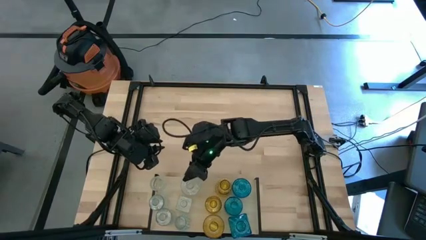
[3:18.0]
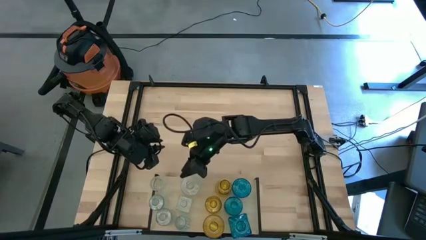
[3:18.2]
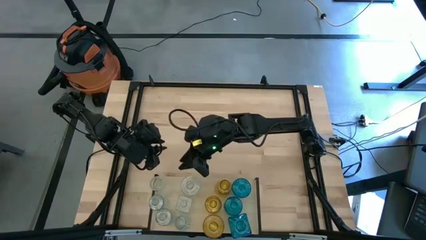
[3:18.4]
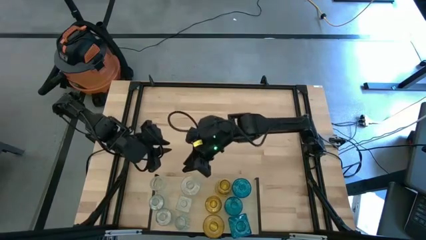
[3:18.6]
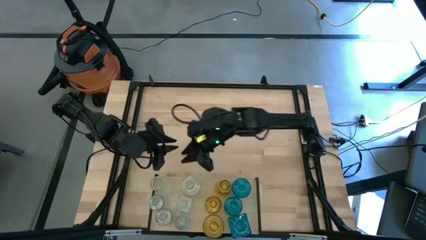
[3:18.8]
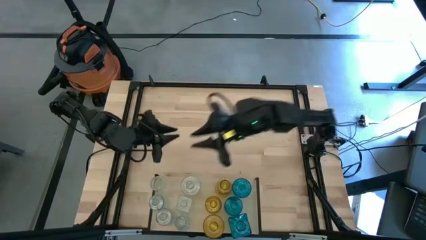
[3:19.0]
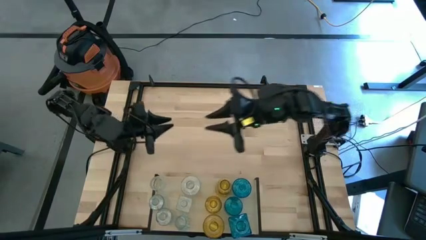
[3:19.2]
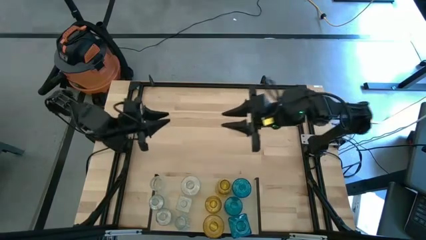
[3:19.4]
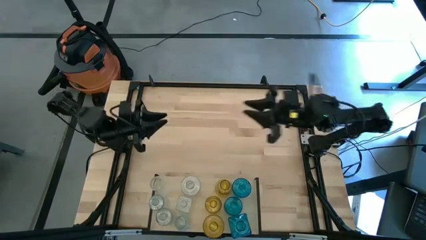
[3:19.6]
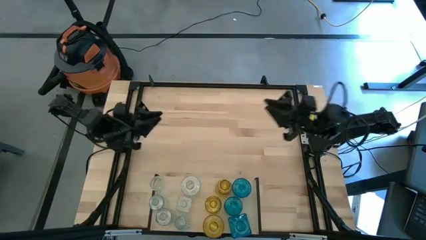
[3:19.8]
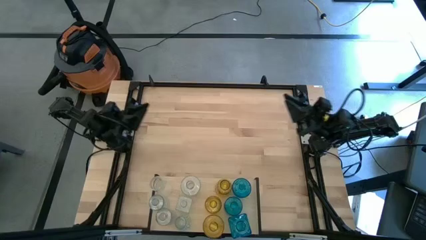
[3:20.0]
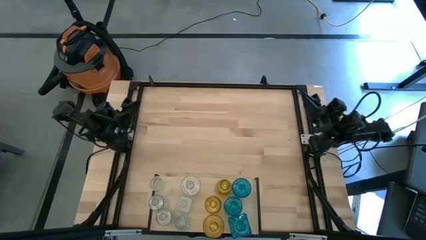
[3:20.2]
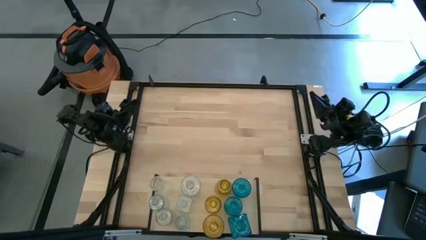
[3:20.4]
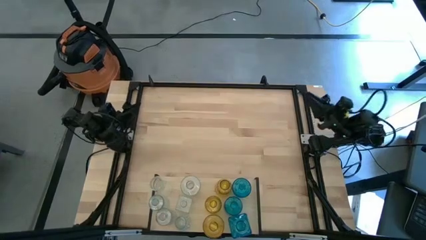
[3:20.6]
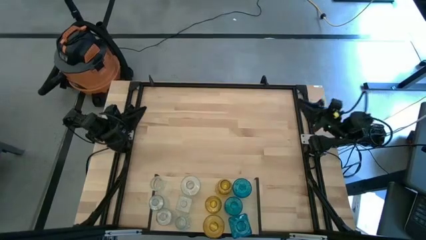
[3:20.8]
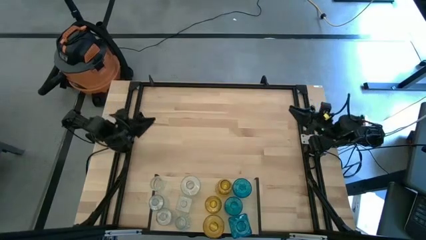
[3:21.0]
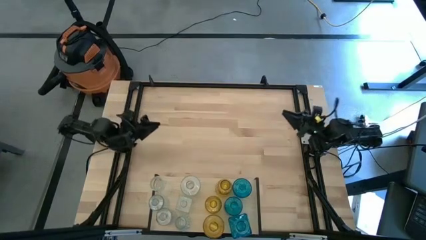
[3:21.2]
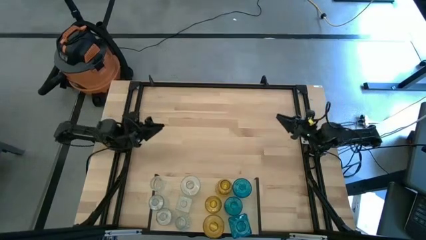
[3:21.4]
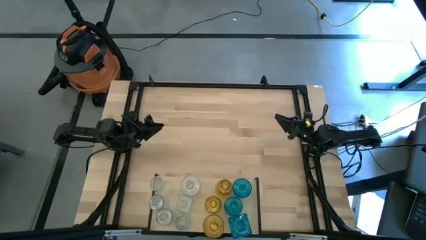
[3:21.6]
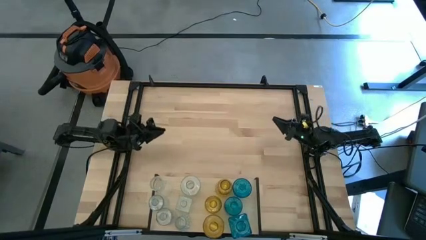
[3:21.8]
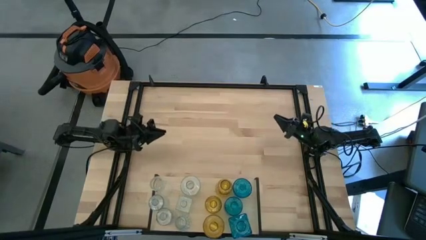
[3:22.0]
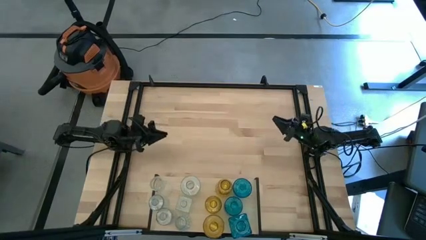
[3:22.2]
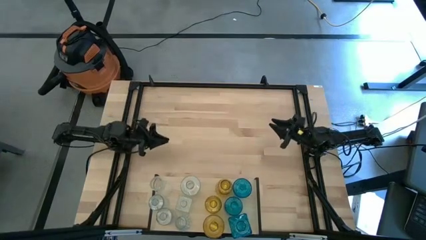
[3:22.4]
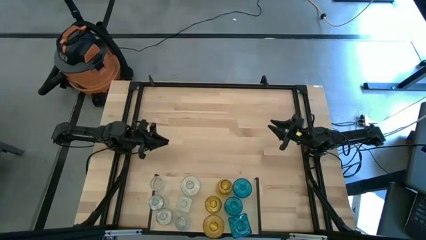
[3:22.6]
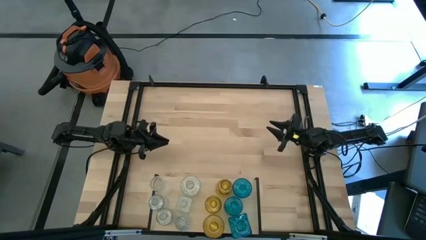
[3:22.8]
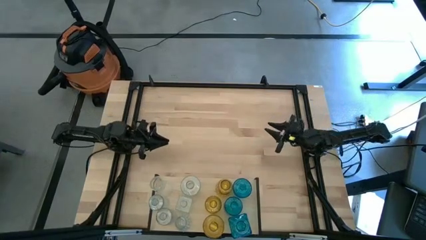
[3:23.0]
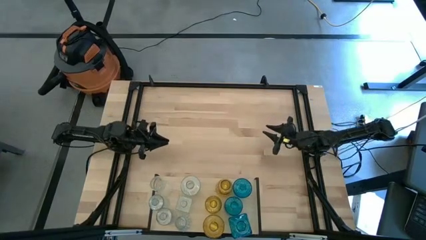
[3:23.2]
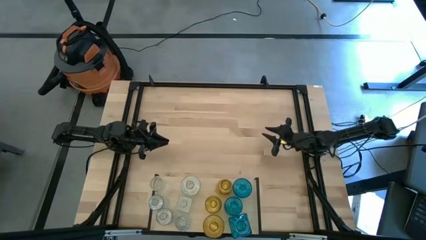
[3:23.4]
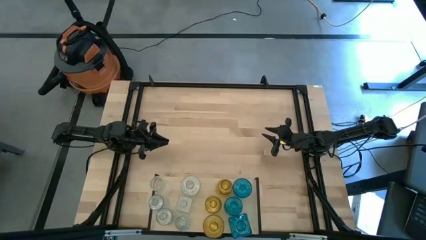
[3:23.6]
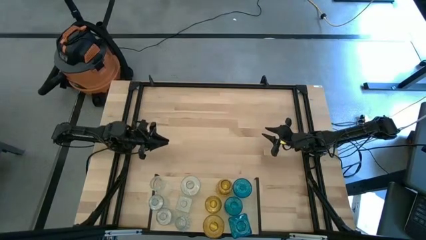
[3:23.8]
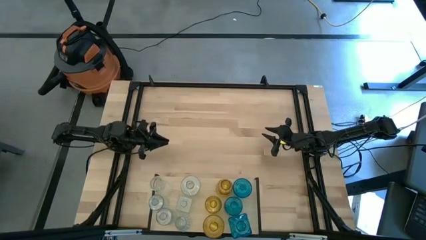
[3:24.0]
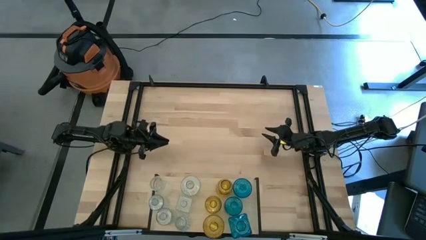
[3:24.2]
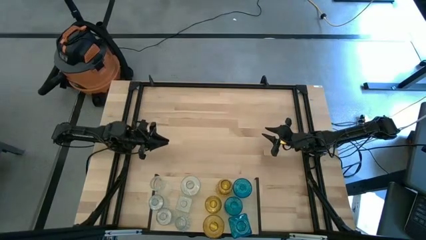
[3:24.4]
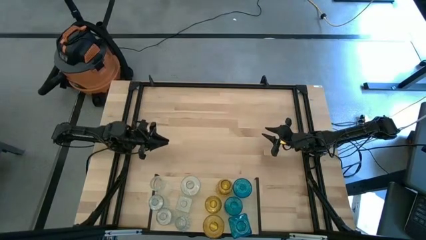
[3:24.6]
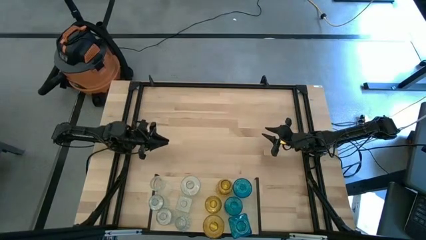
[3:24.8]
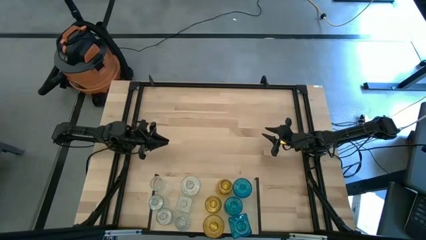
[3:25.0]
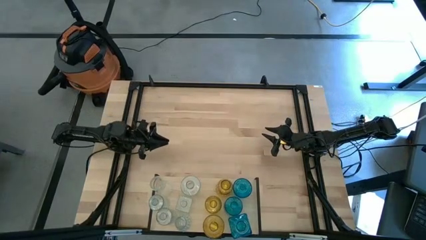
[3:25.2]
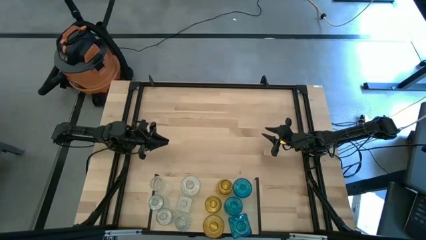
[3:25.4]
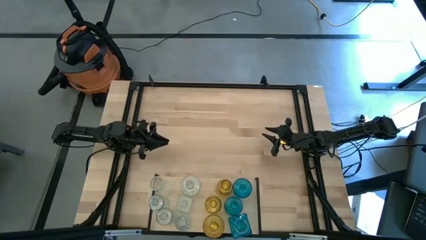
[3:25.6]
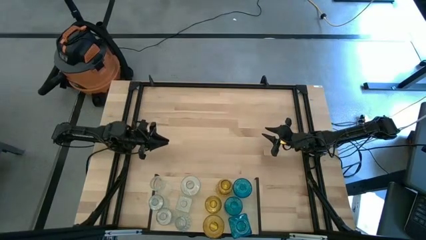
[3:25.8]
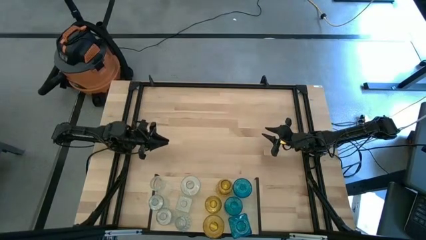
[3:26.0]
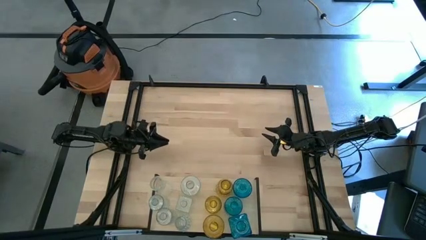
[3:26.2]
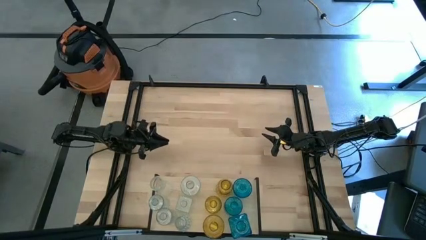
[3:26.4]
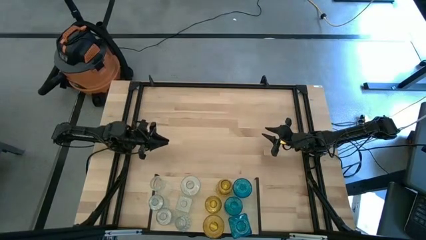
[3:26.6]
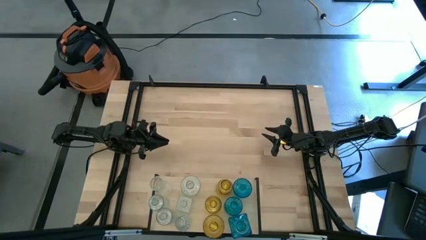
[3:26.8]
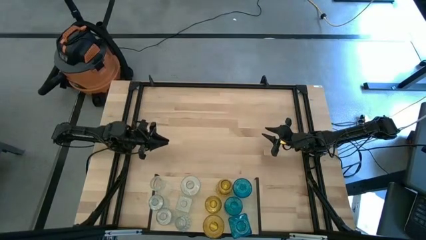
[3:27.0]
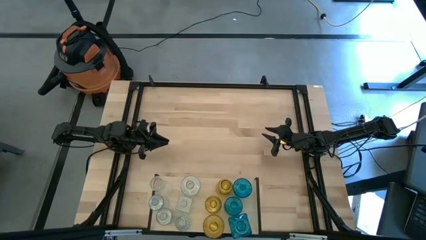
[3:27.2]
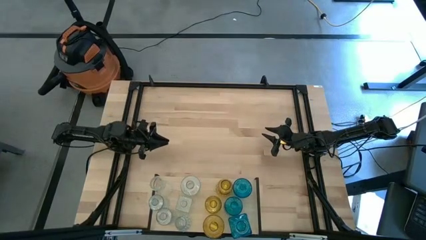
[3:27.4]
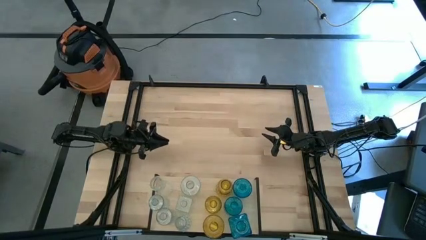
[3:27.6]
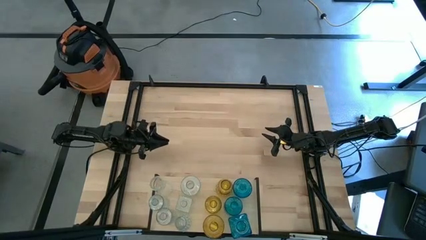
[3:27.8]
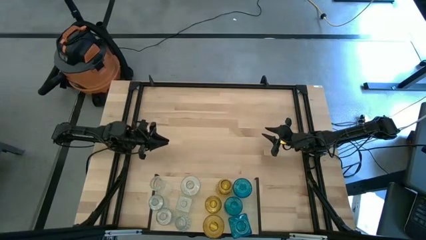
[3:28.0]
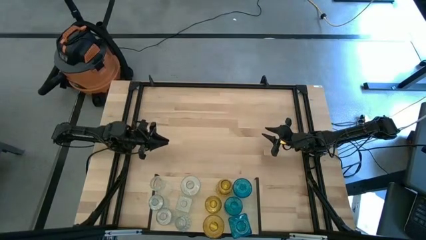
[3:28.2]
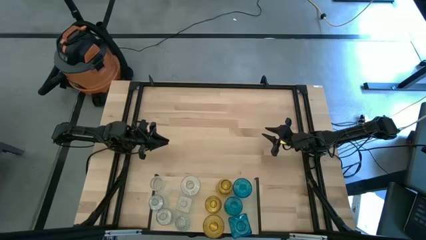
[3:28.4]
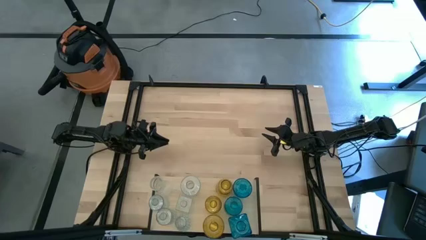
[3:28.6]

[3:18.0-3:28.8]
Task: sort vases onto shelf
Return to Home Position

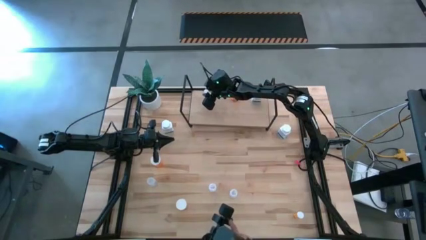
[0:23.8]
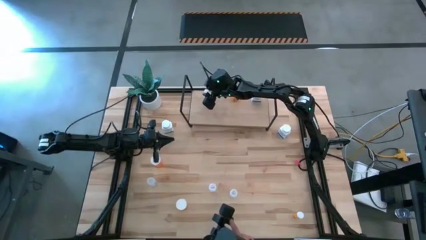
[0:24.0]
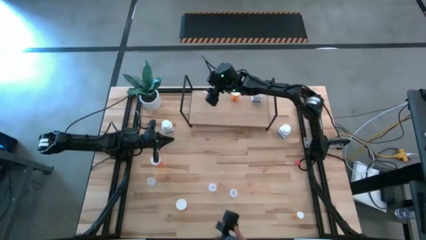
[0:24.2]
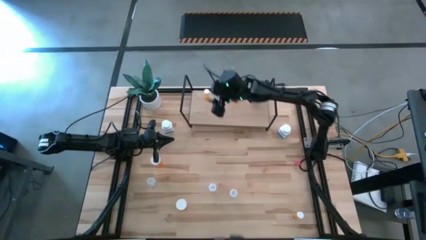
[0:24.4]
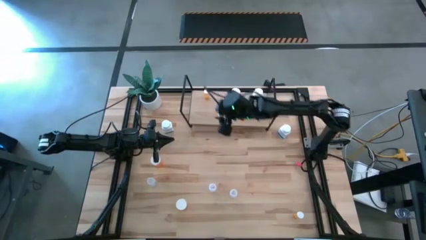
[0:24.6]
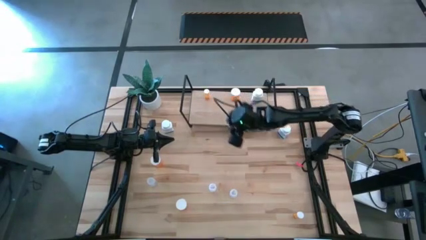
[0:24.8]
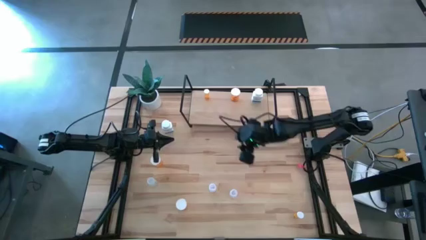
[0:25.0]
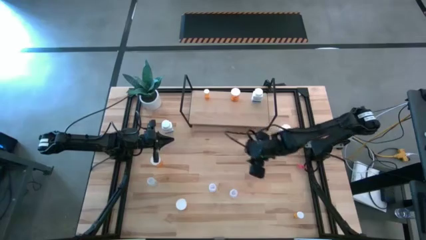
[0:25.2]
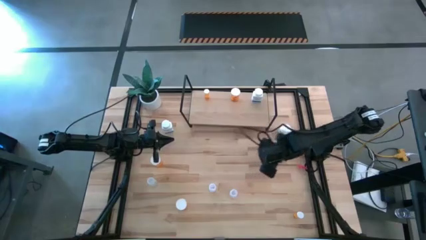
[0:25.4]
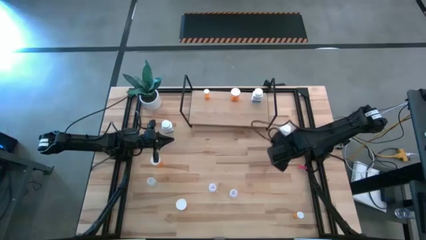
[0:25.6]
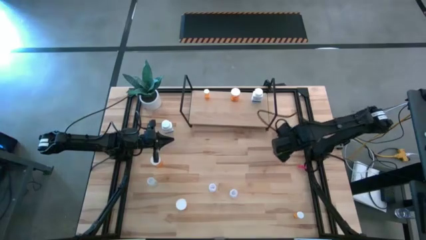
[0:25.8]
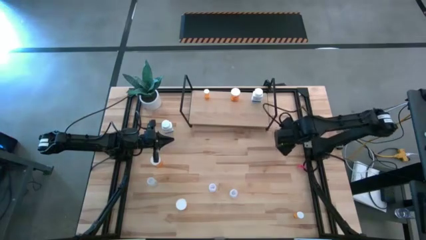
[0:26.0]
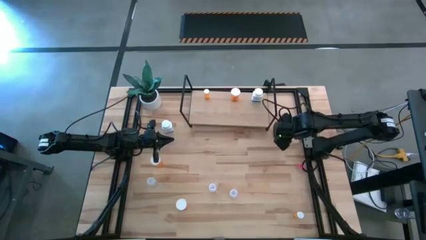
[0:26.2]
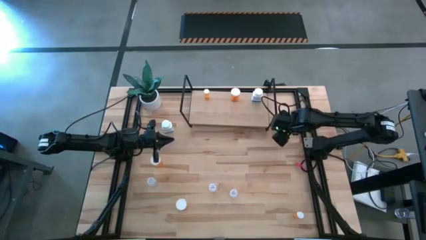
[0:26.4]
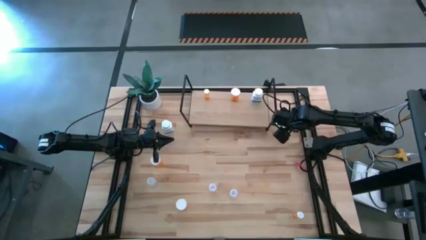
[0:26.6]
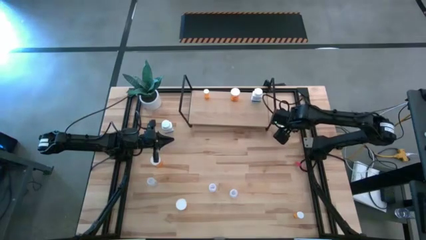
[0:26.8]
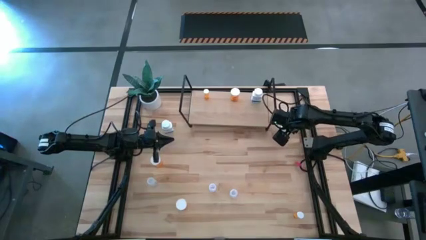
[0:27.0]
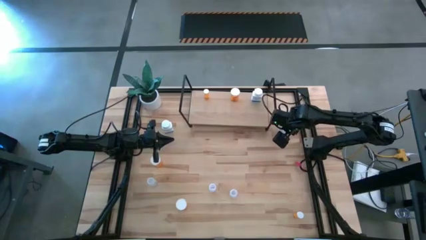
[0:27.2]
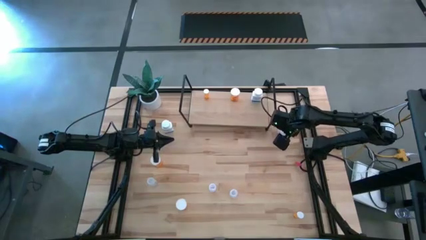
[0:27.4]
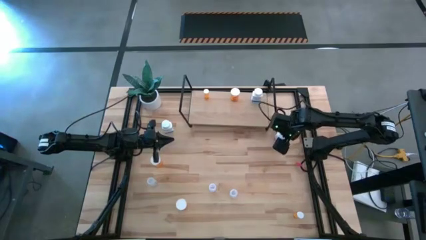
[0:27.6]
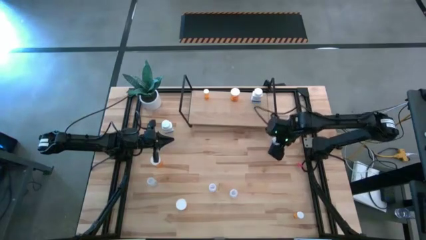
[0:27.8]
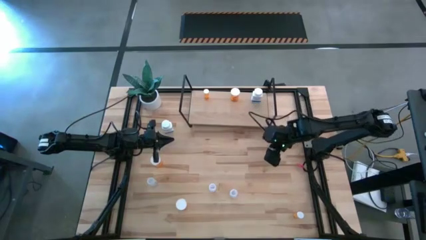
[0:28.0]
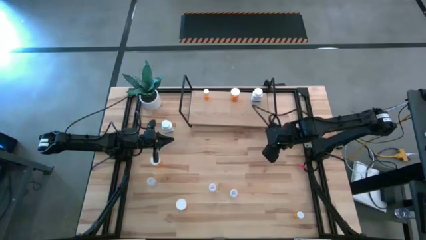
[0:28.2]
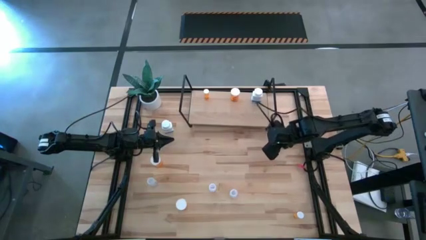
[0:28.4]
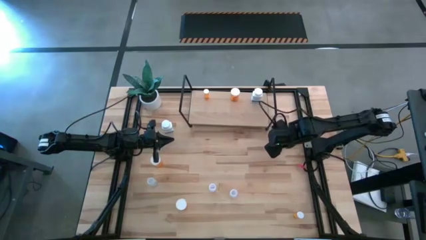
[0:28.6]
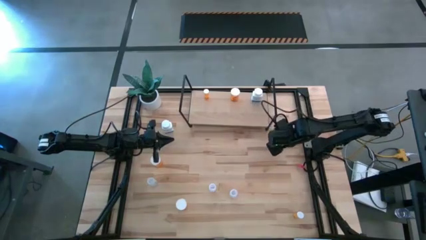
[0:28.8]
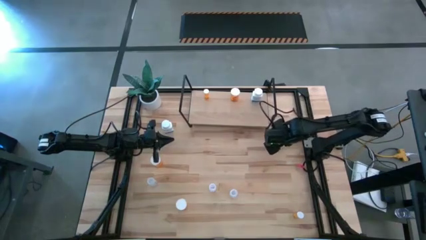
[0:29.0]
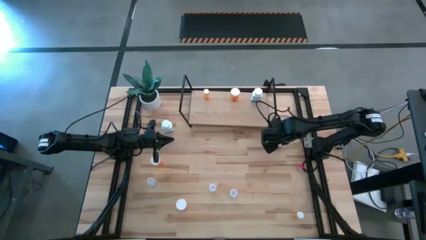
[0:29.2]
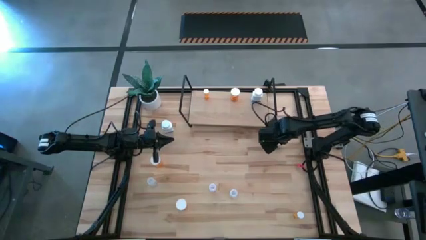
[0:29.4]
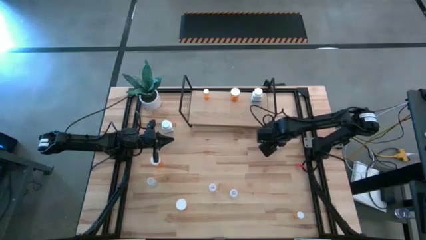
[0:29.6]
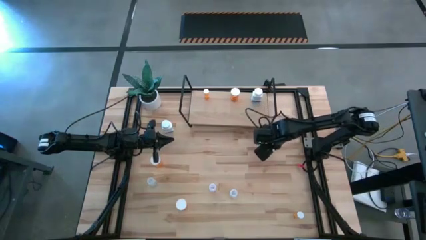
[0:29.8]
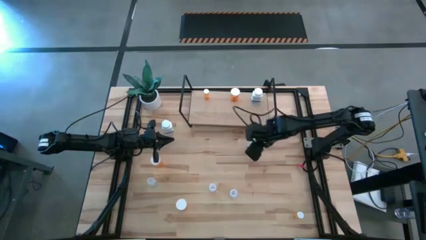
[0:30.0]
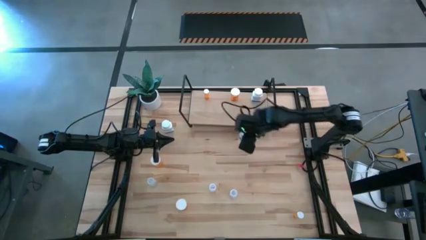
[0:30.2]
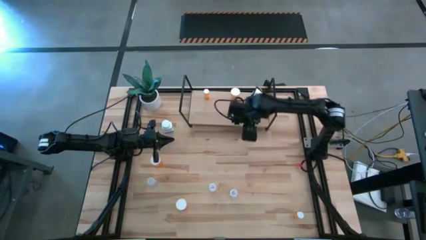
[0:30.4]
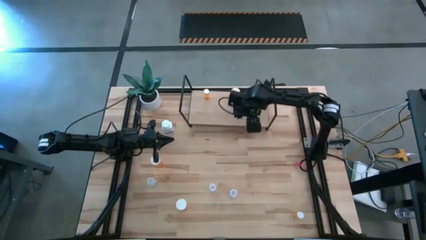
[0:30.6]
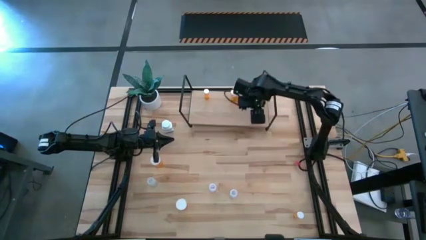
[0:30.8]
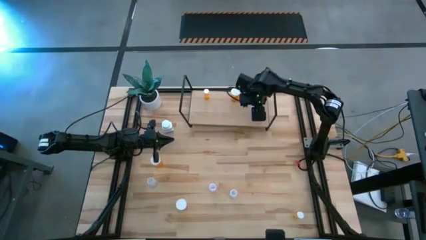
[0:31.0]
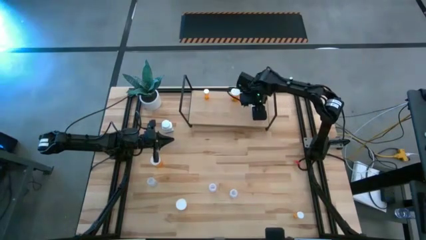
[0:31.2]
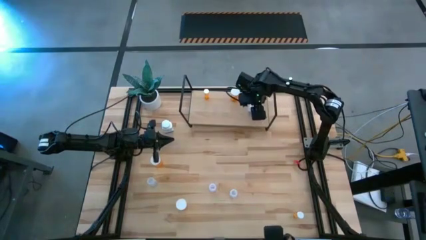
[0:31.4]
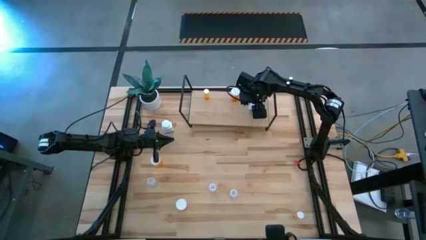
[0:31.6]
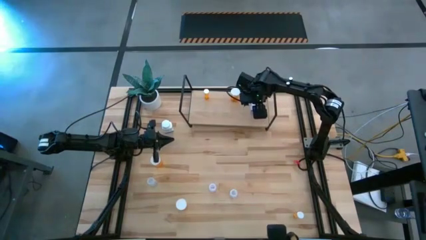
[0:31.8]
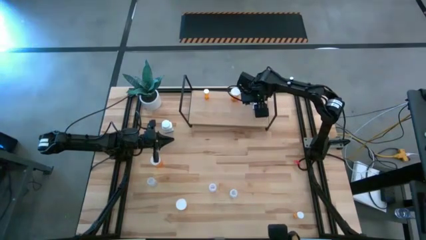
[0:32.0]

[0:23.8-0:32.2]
Task: Pick and place medicine bottles onto shelf by color
Put the right white medicine bottle on the shelf aligned with the other white medicine bottle
